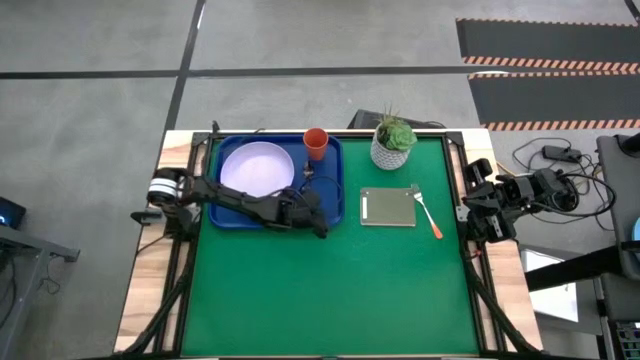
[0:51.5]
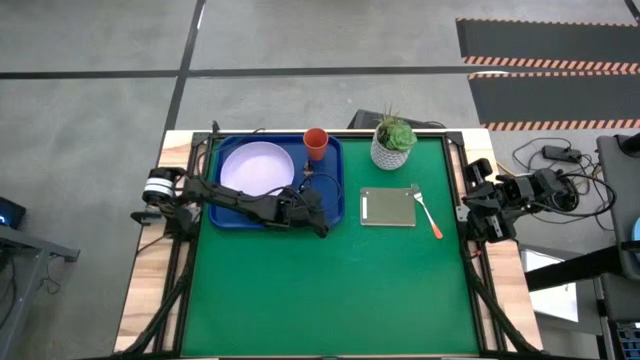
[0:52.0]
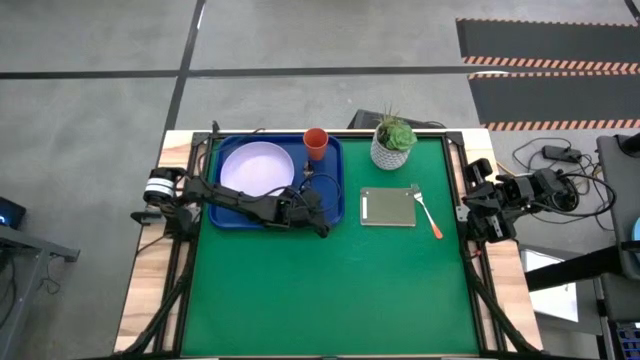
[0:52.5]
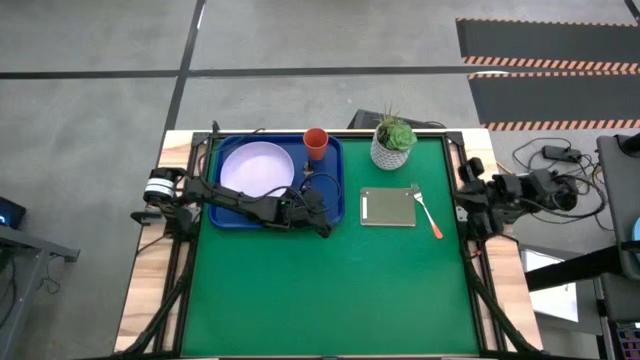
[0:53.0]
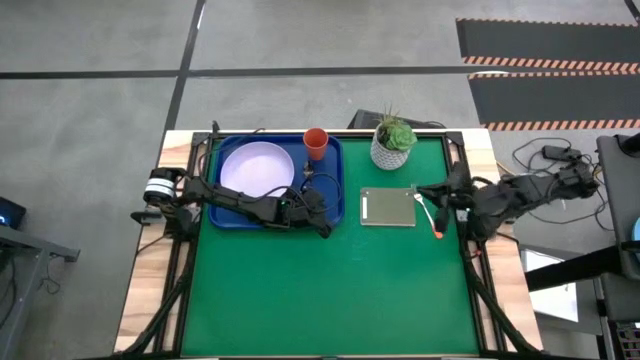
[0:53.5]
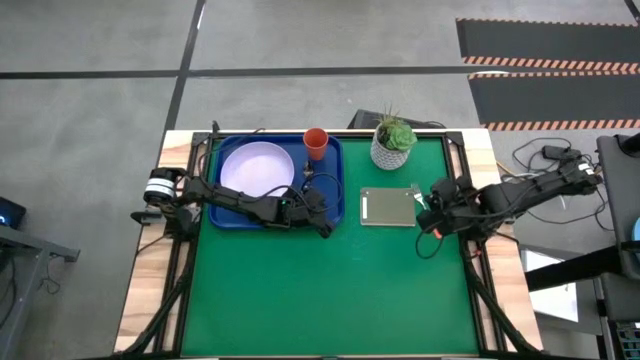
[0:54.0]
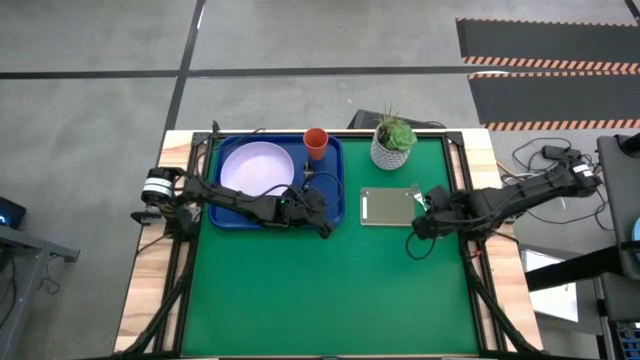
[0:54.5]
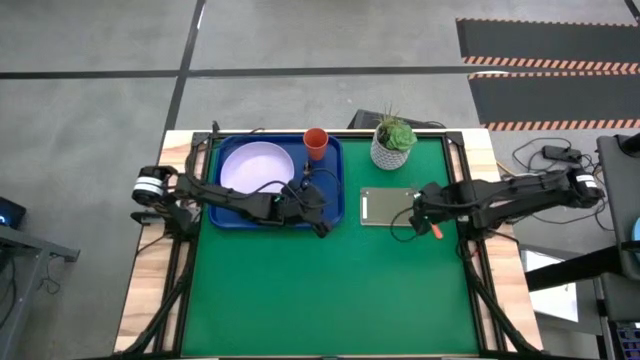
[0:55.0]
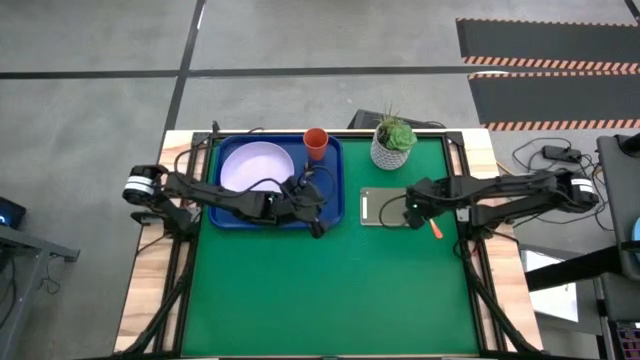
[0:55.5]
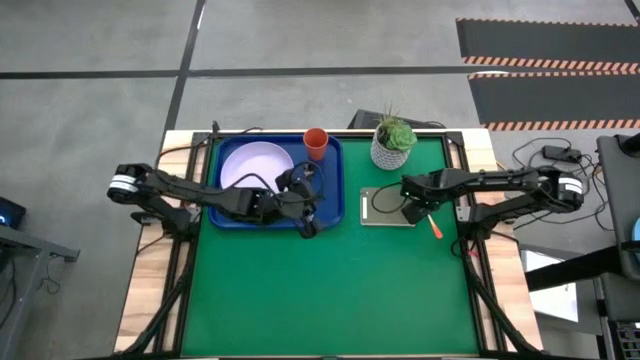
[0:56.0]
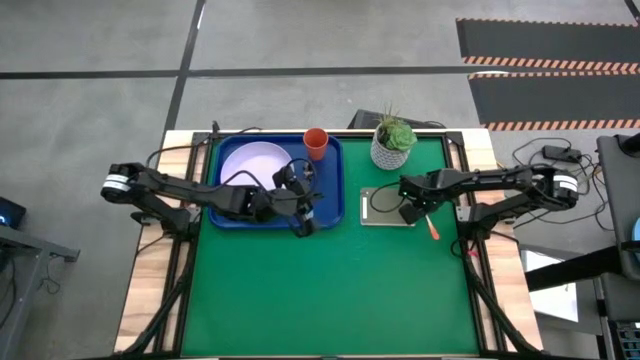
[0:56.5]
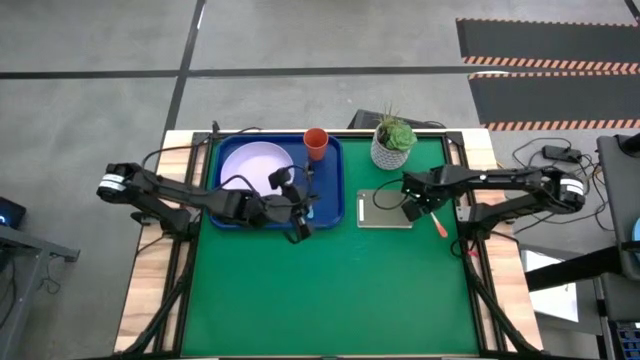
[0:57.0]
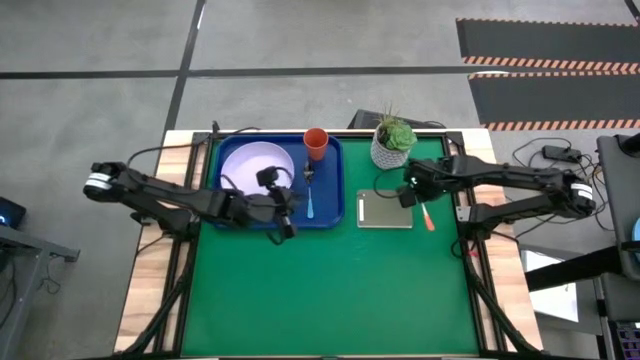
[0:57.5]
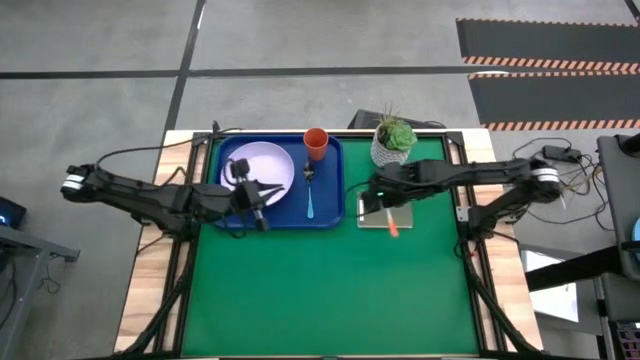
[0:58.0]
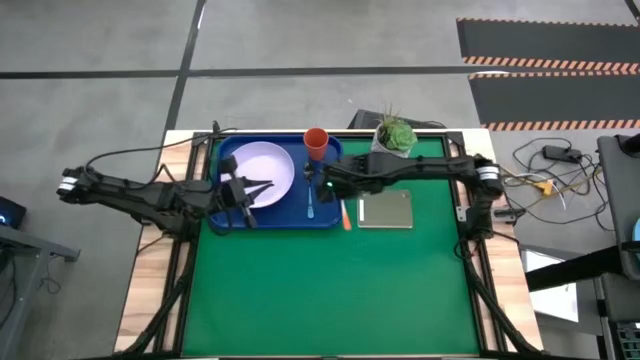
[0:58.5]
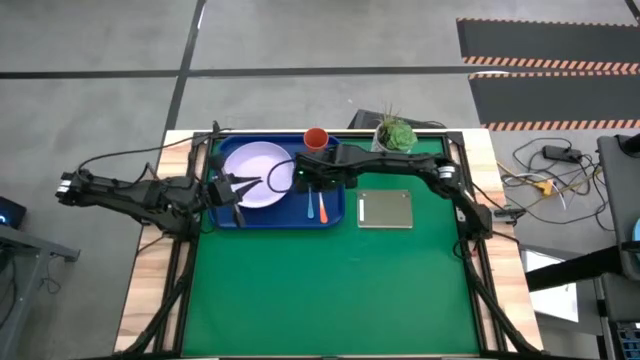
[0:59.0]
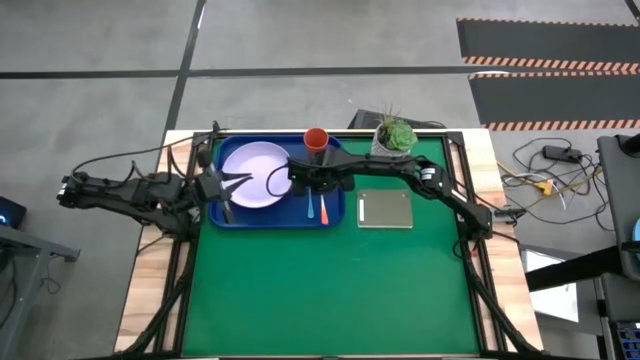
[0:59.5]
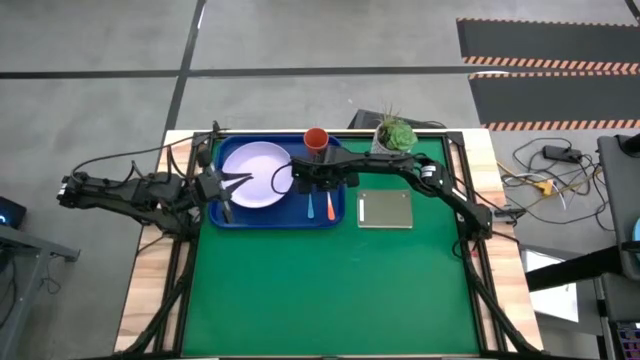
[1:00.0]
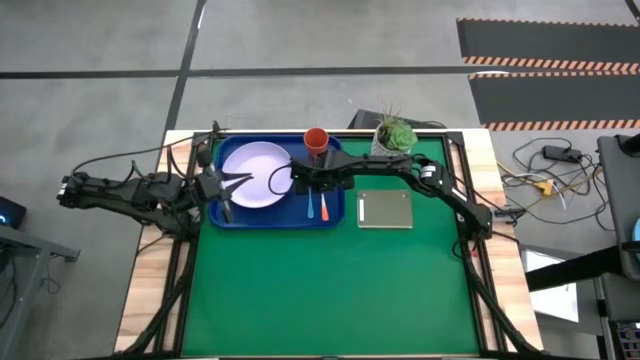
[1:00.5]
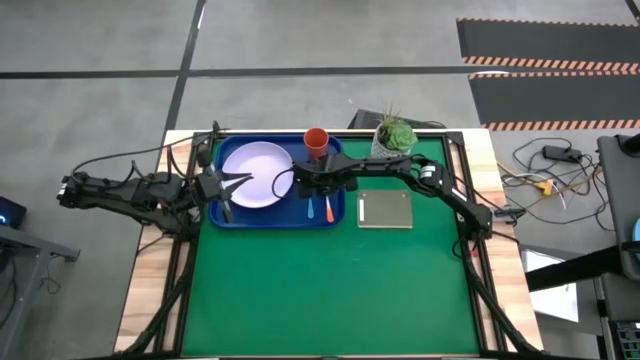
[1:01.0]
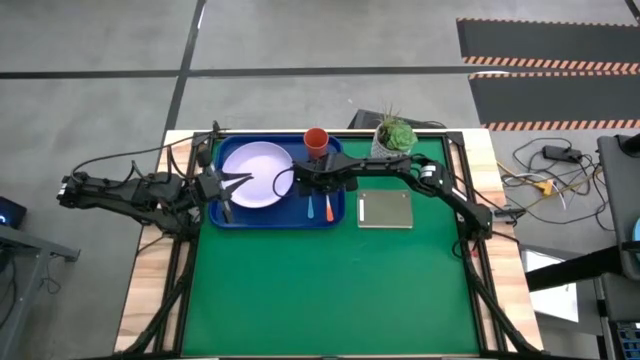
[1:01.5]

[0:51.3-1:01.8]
Task: Pick and place plate/cup/fork/spoon on tray
Put the orange fork to the right of the blue spoon on the dark blue tray

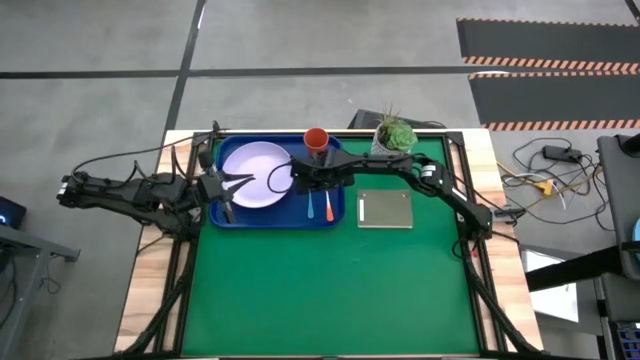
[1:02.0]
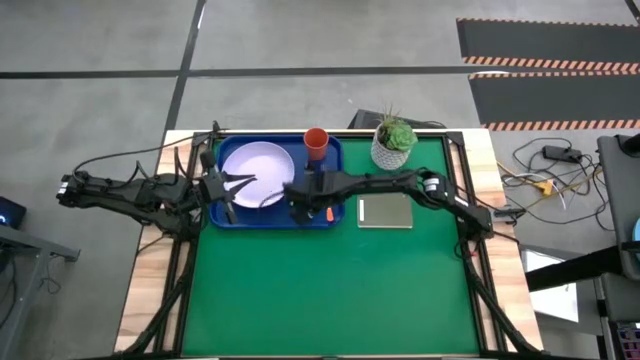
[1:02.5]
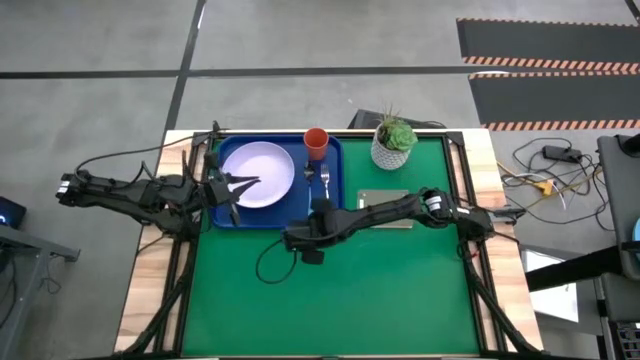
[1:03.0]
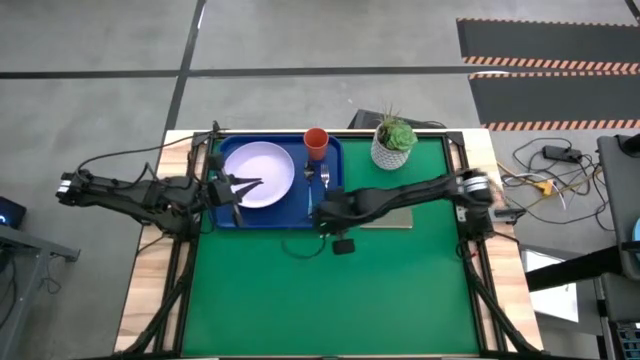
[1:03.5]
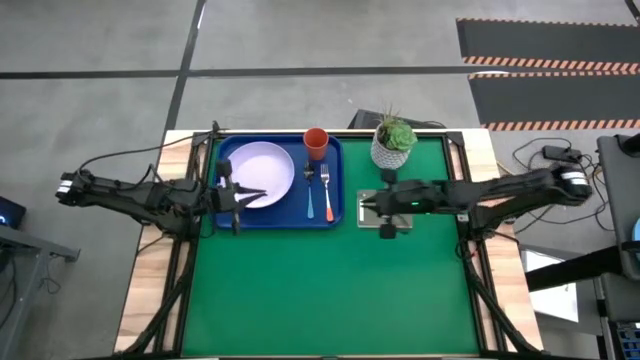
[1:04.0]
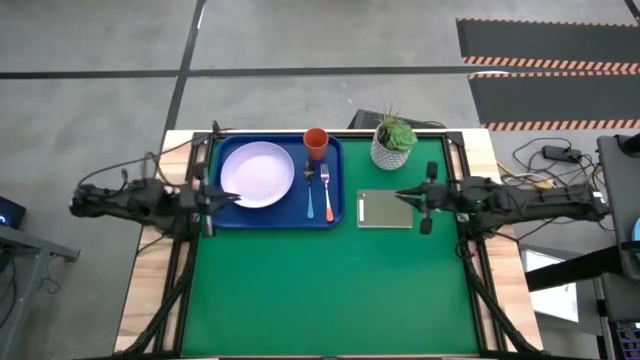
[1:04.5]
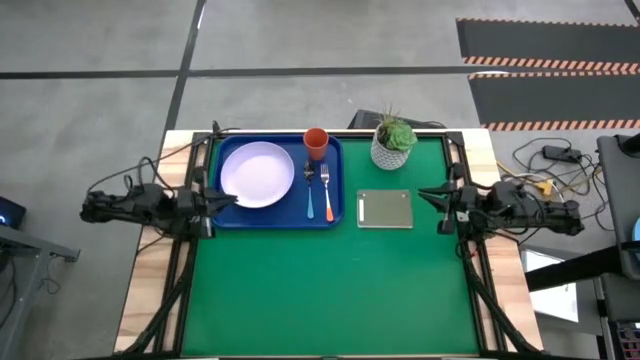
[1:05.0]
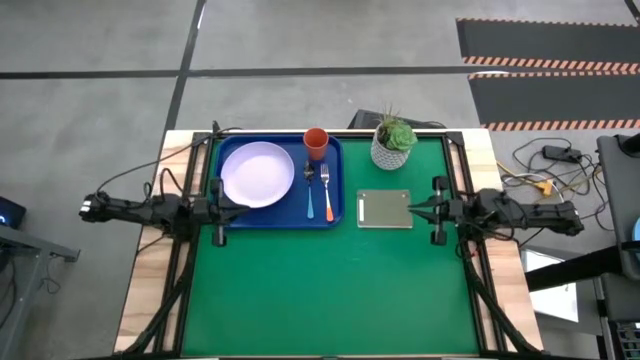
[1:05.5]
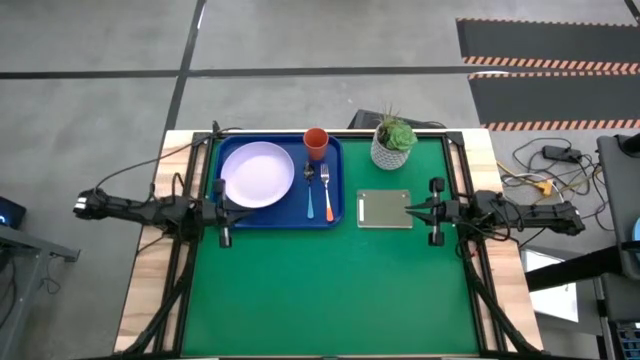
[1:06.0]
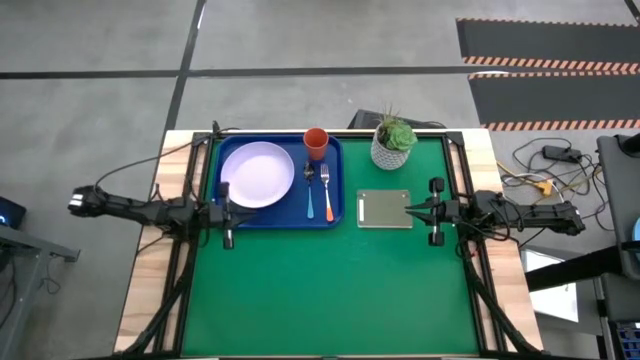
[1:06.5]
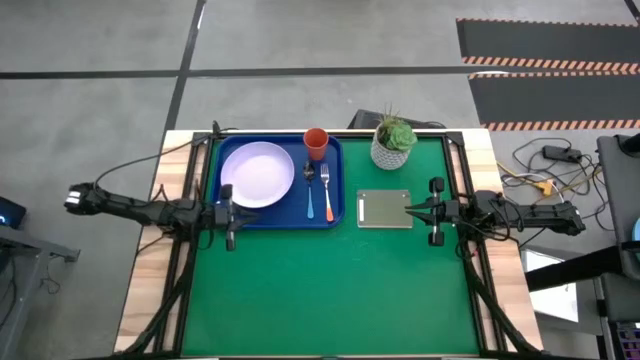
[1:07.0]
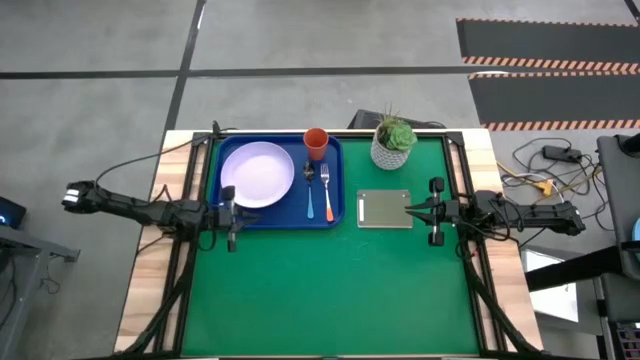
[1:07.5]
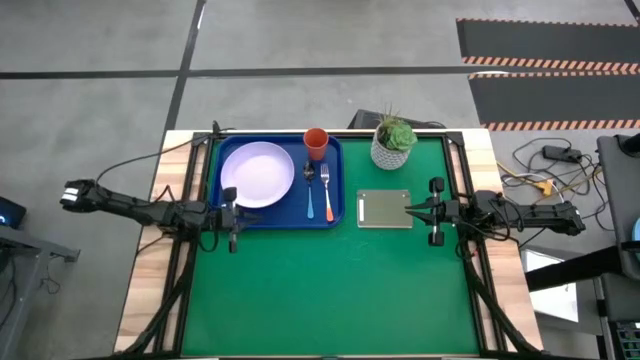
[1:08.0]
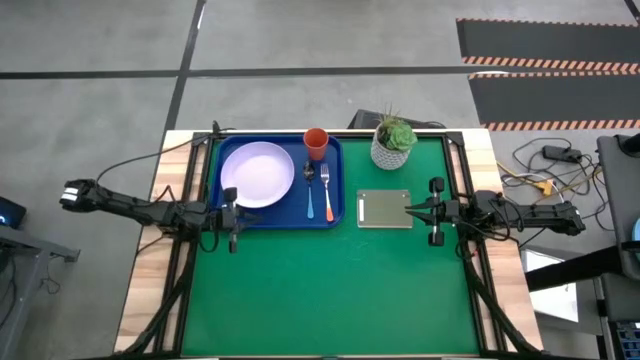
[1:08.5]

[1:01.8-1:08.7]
Return to Home Position

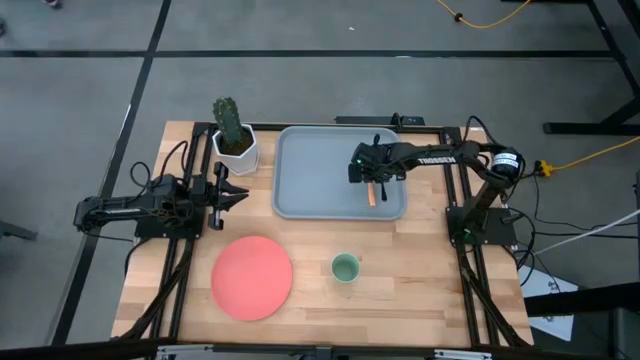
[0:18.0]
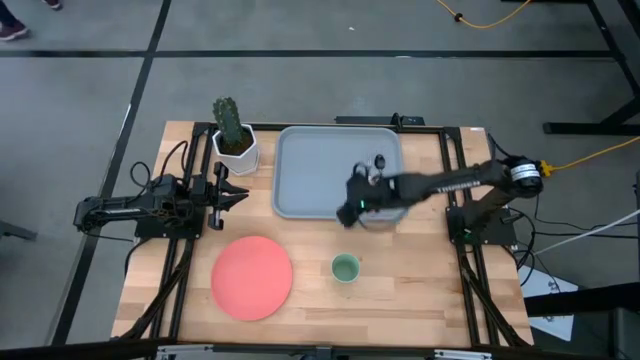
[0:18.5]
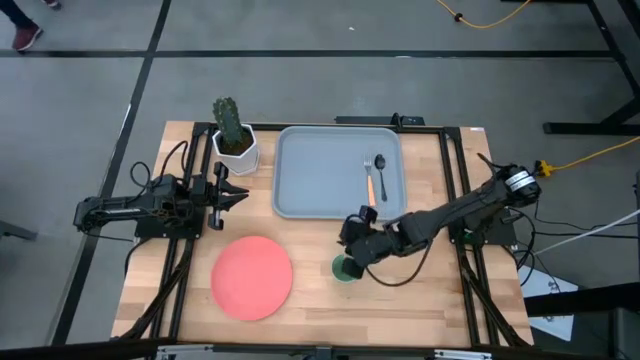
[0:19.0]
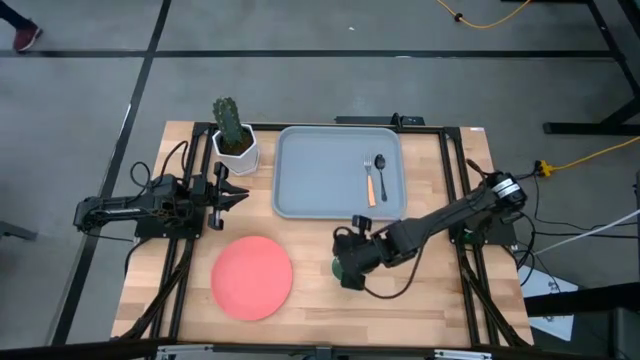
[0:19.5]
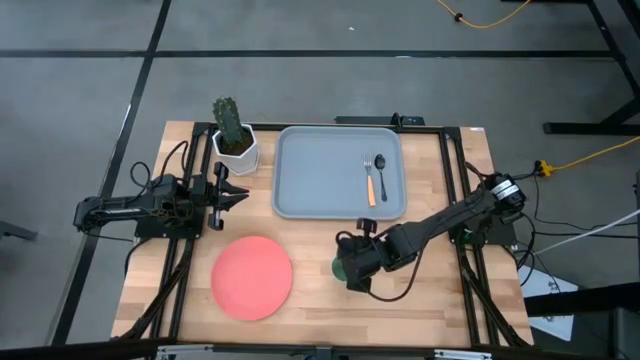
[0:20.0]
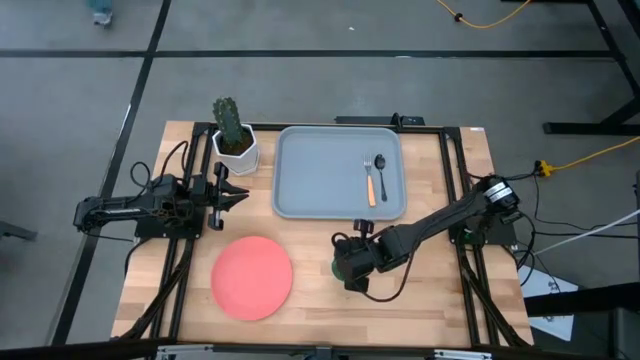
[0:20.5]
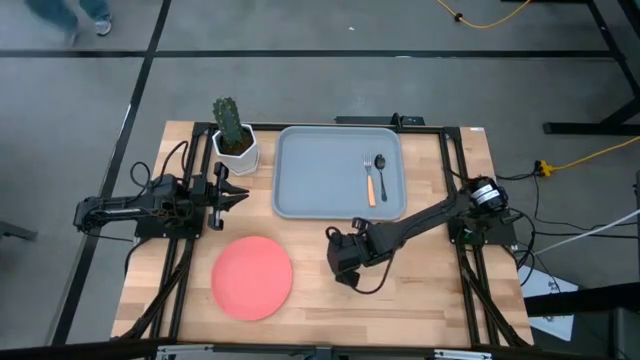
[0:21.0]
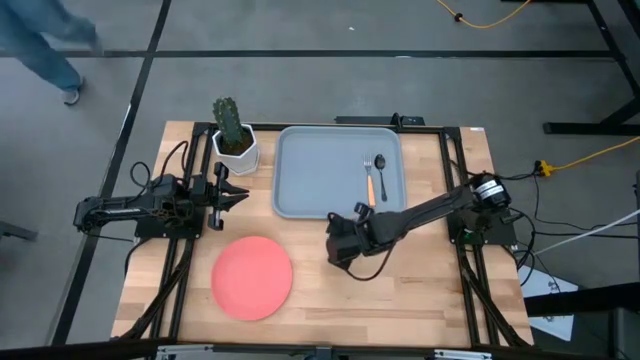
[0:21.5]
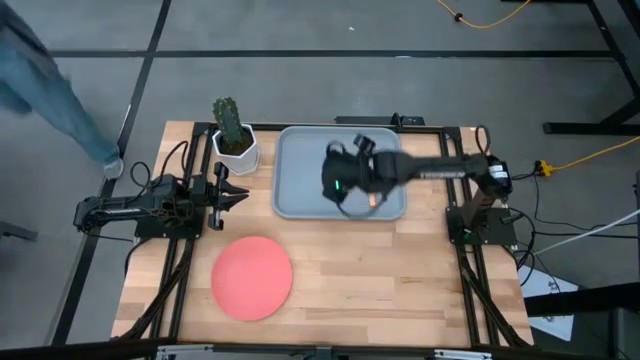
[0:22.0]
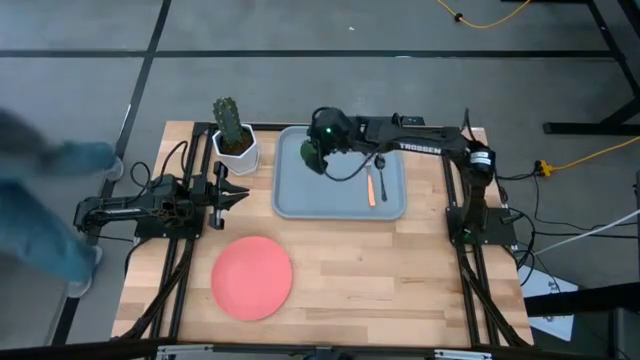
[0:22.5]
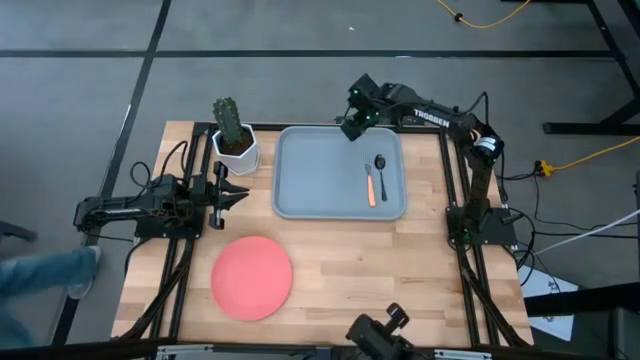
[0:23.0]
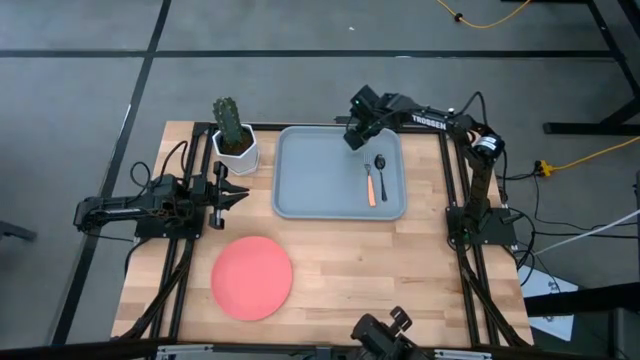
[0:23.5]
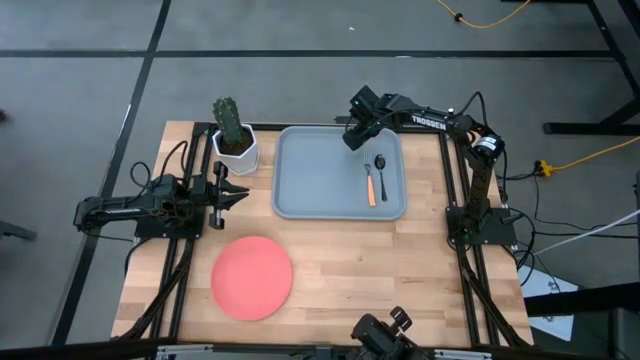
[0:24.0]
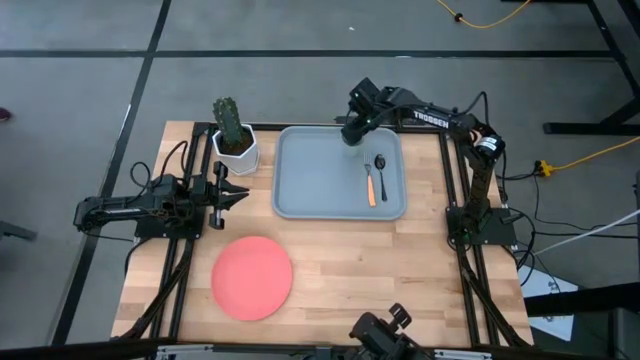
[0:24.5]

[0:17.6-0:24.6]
Task: Pick and place plate/cup/fork/spoon on tray
Put the green cup on the gray serving tray to the top left of the orange fork
